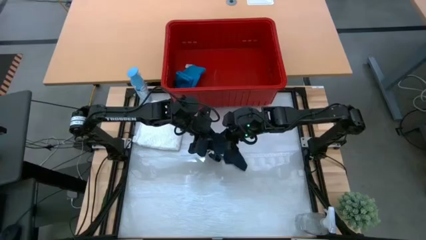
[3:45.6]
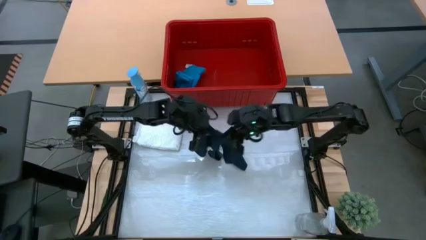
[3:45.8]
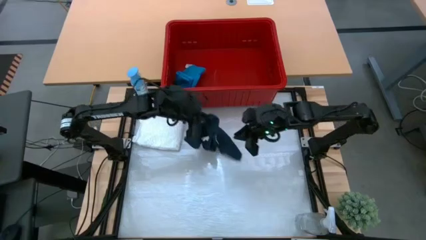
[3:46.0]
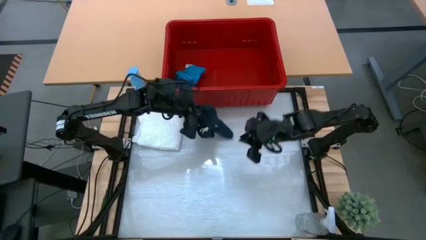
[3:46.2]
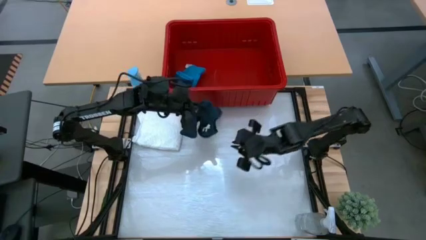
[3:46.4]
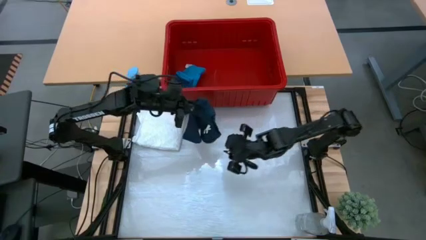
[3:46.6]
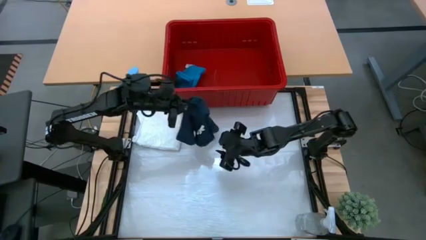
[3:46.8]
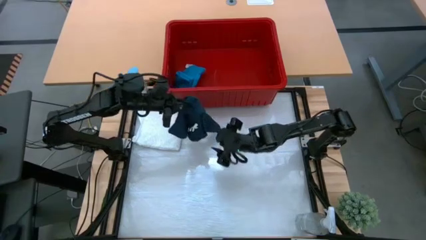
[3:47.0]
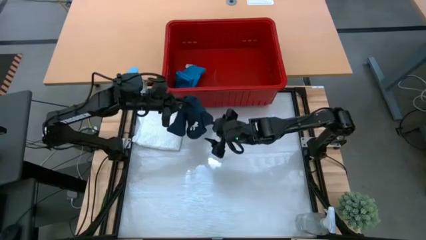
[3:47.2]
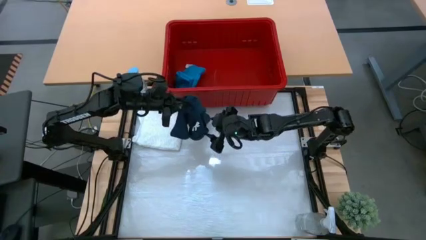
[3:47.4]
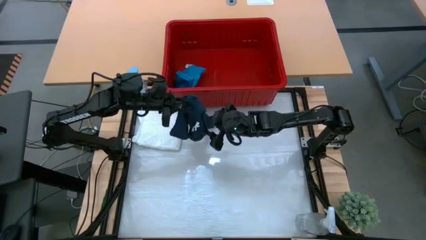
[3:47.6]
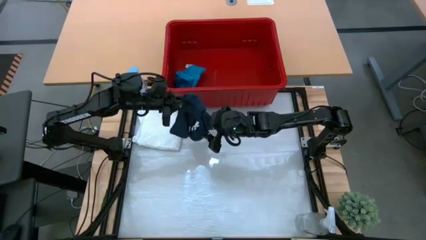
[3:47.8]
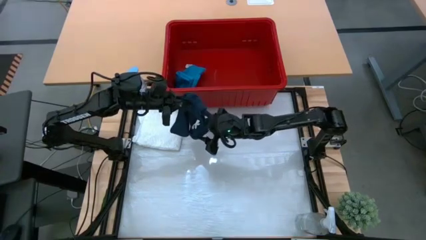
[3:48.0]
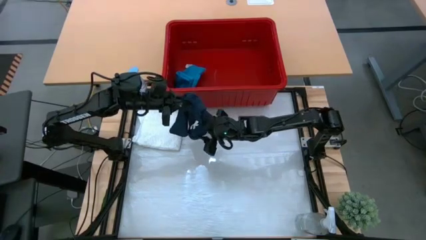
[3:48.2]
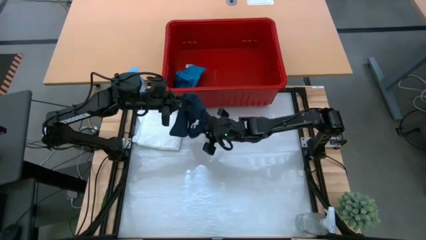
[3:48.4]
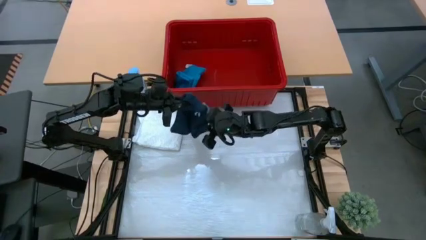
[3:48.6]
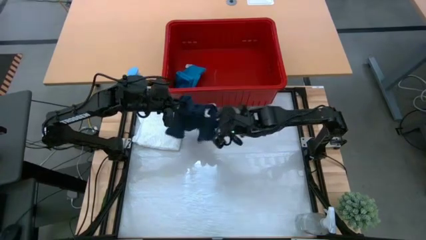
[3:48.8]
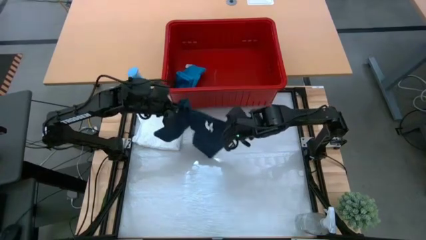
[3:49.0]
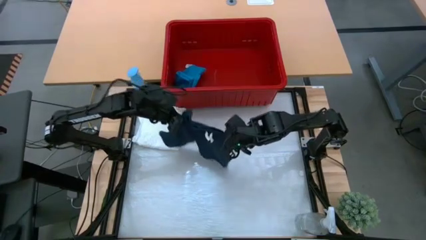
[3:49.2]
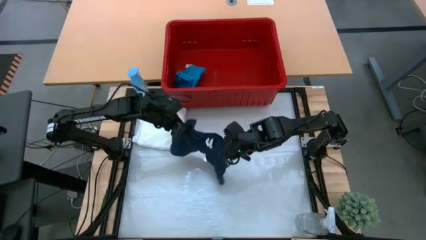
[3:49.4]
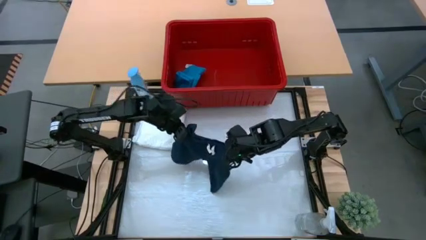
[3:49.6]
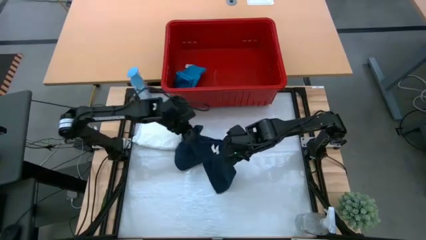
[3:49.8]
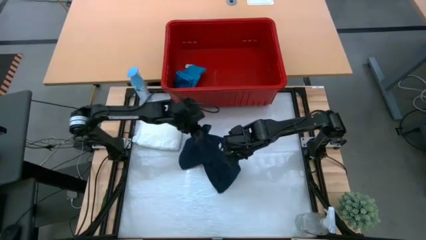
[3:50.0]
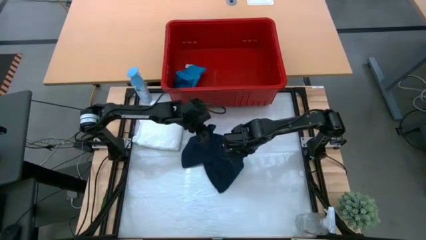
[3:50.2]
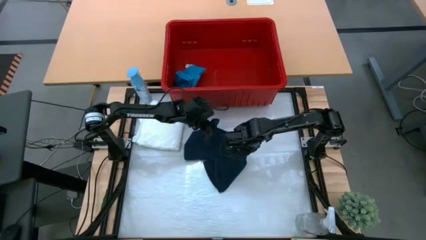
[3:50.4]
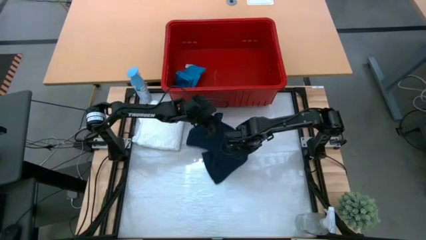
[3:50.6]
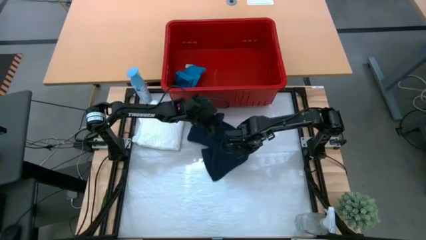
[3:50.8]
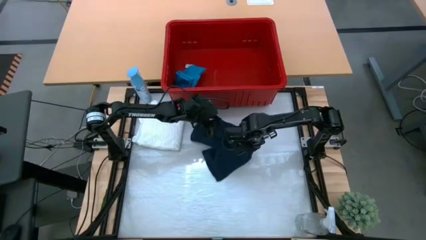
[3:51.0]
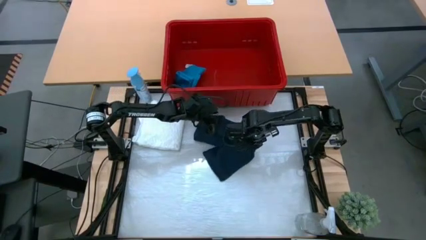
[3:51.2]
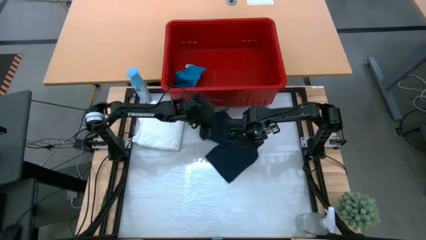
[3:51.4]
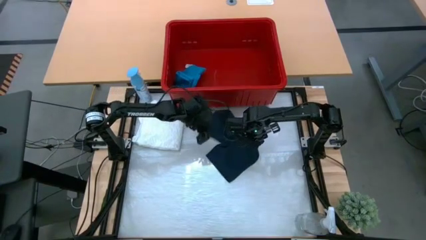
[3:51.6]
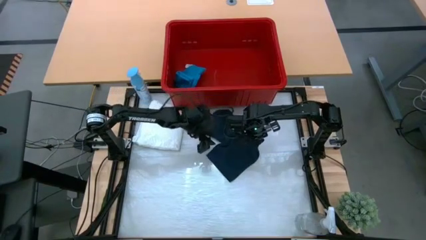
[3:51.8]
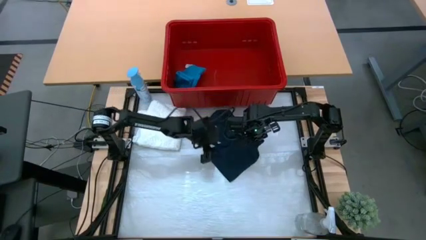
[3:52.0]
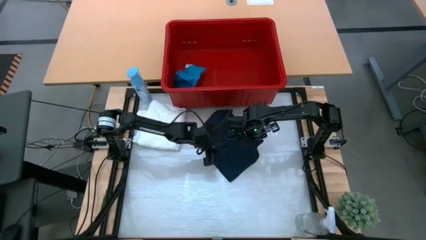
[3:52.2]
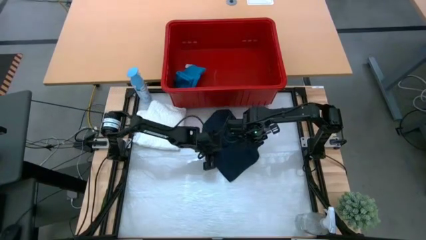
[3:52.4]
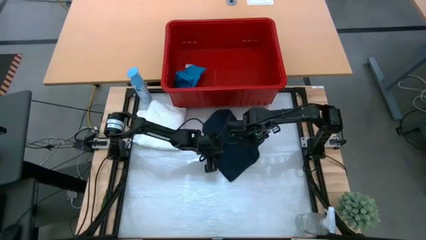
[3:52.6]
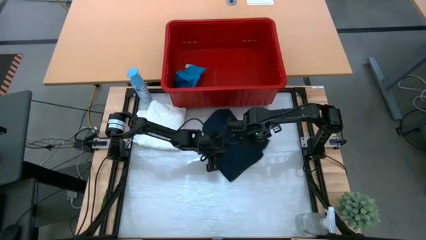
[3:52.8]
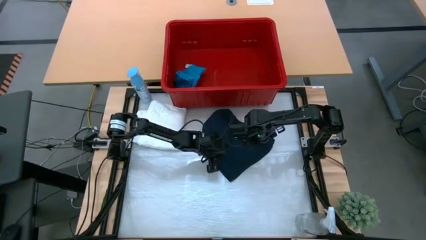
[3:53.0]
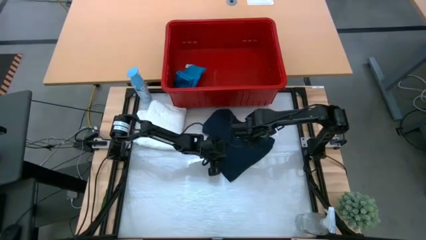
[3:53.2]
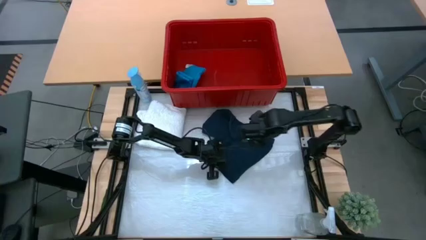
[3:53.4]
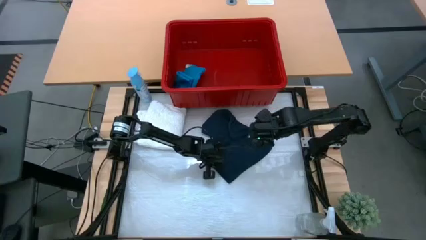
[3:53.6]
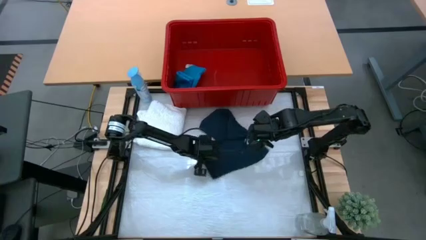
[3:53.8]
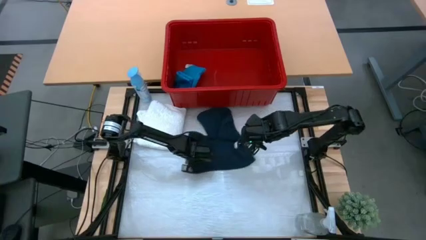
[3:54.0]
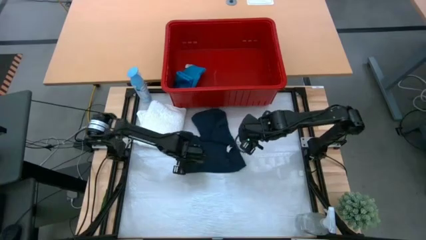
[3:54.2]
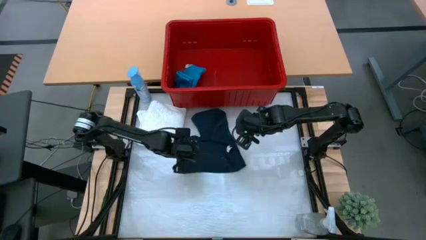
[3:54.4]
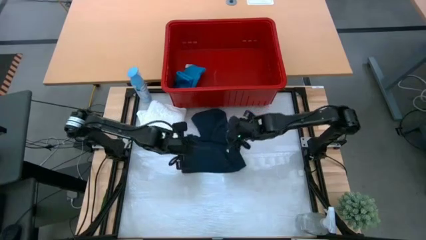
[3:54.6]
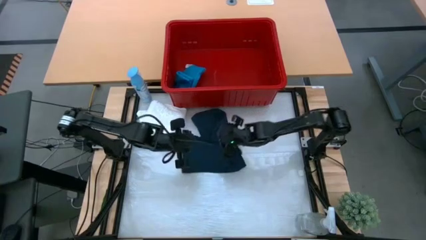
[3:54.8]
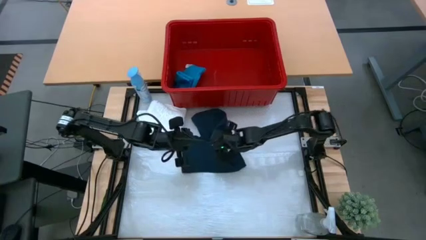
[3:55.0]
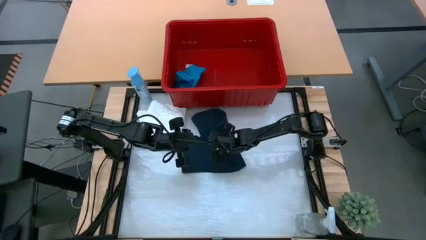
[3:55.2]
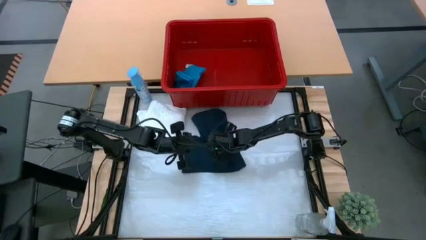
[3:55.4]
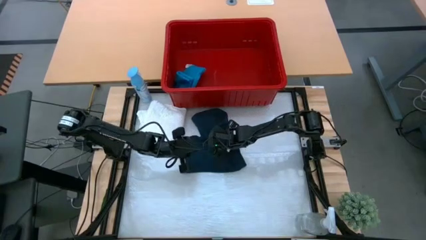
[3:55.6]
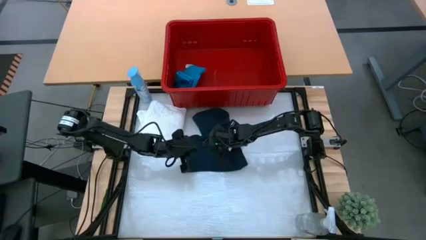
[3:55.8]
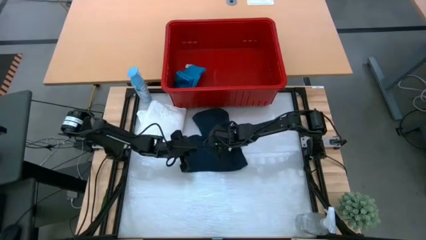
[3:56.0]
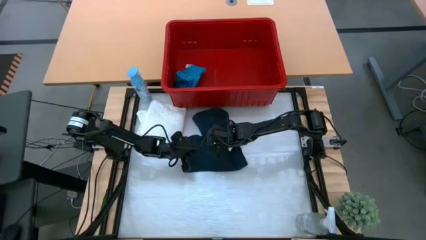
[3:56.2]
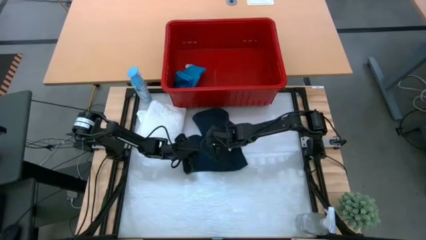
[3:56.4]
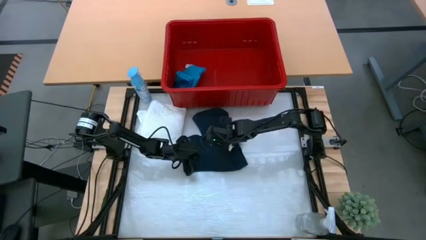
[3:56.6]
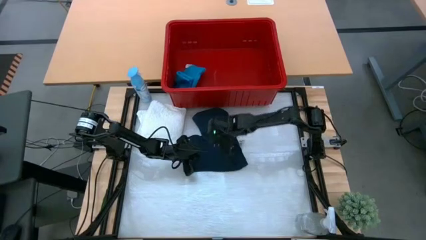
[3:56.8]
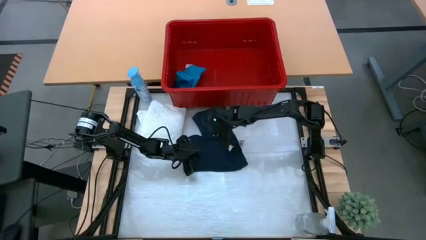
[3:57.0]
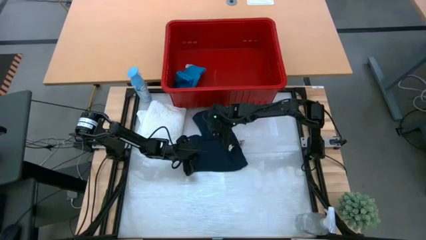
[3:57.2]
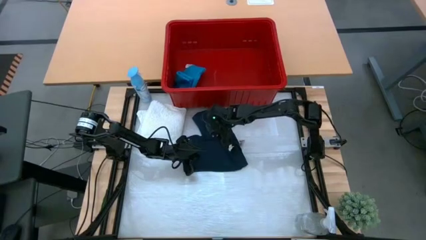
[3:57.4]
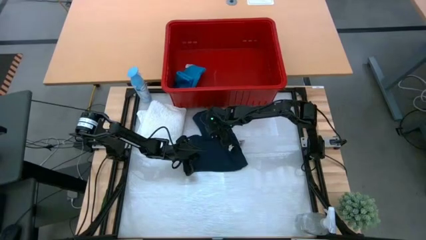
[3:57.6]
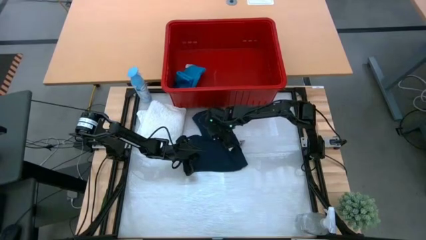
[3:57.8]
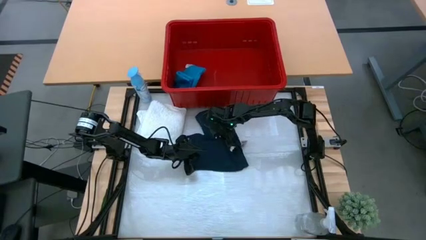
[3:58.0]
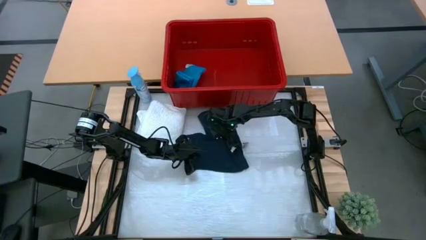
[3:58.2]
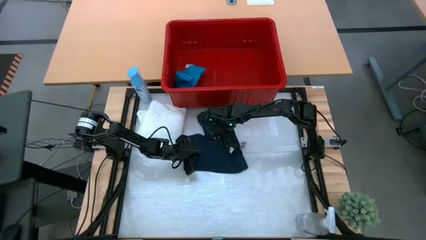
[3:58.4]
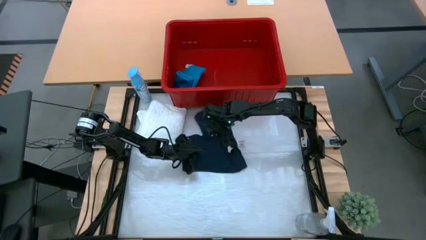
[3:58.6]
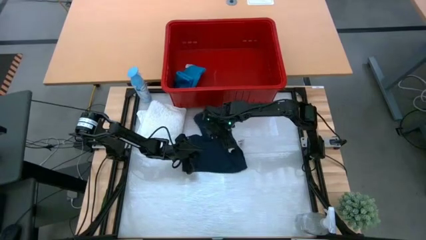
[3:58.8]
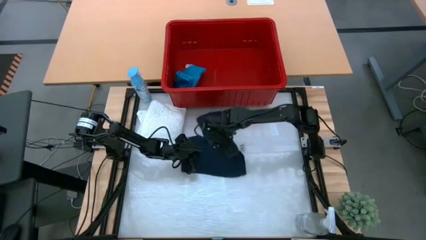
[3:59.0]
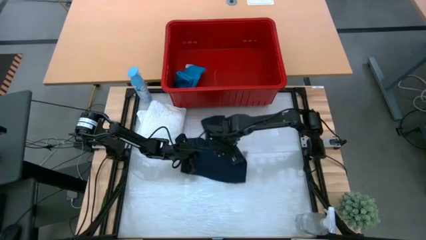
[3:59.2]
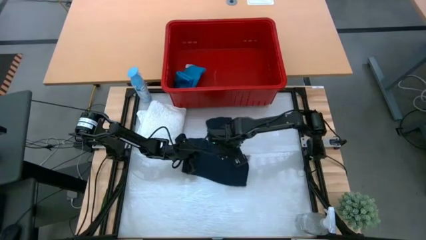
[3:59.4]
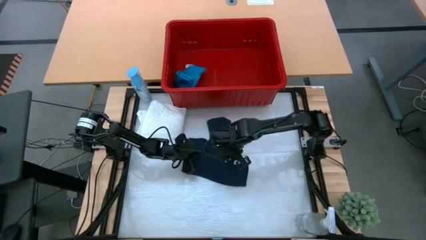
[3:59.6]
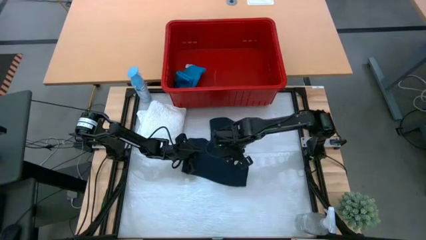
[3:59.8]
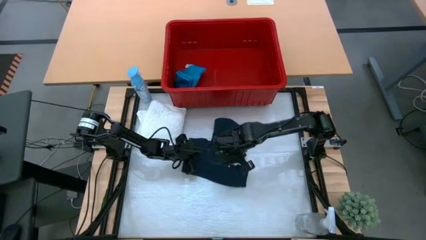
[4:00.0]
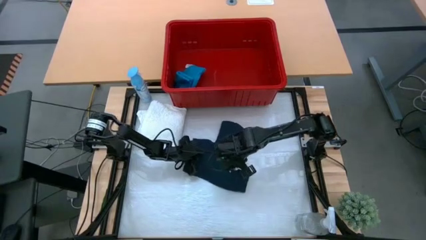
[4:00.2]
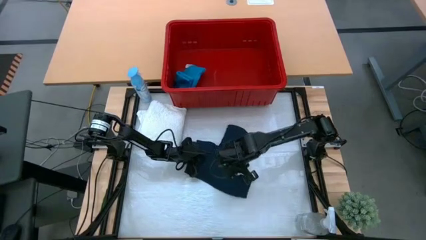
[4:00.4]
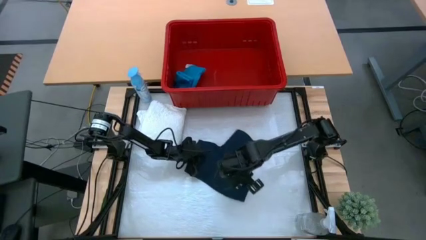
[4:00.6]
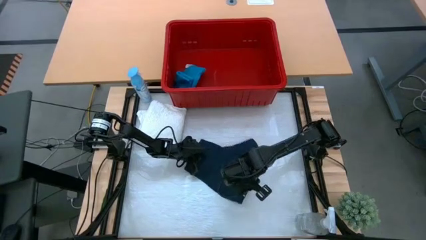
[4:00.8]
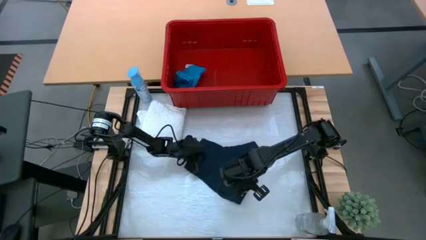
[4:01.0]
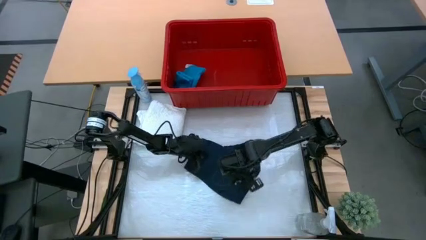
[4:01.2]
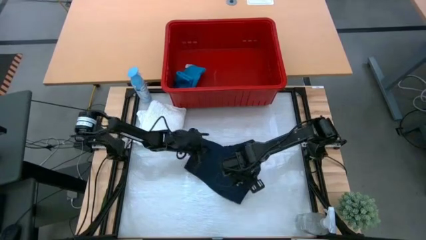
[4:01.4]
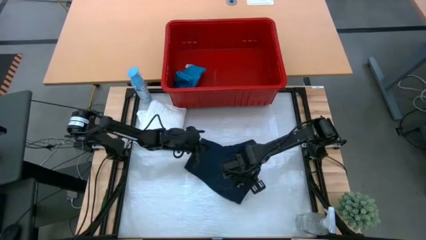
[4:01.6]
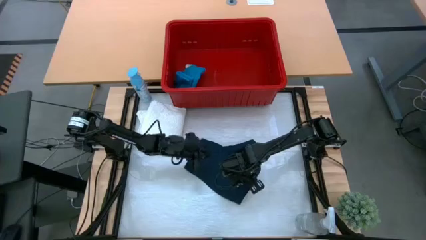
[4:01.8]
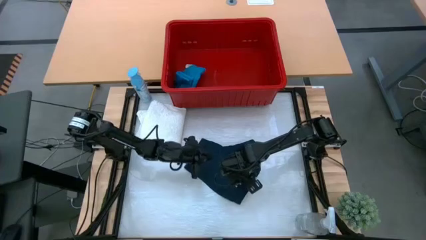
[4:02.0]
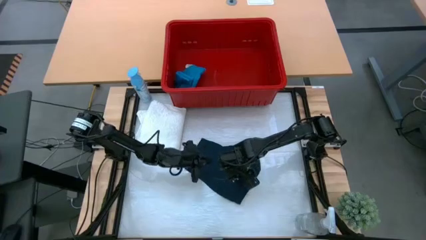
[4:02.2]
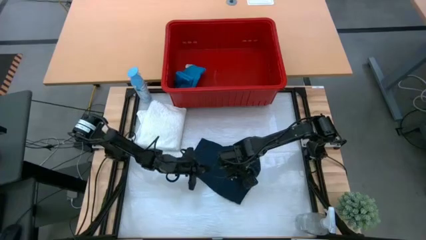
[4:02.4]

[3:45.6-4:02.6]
Task: Fold Laundry from Bin
Fold the black shorts
